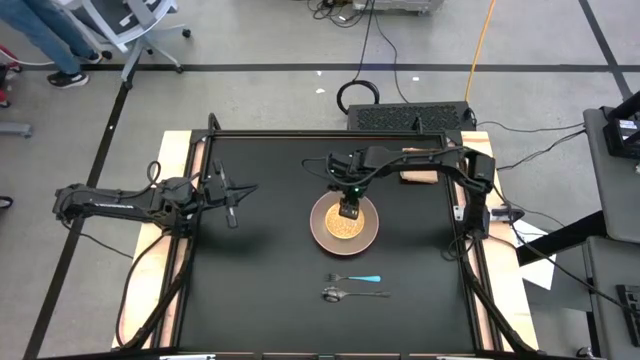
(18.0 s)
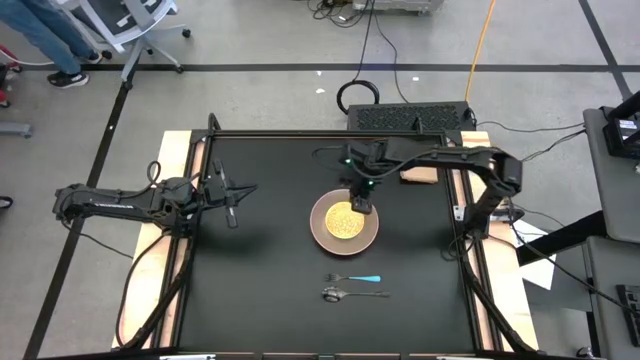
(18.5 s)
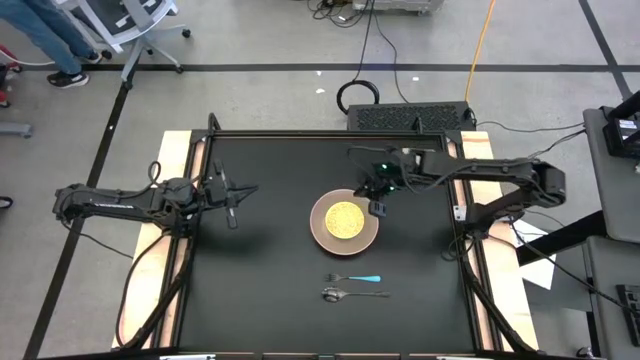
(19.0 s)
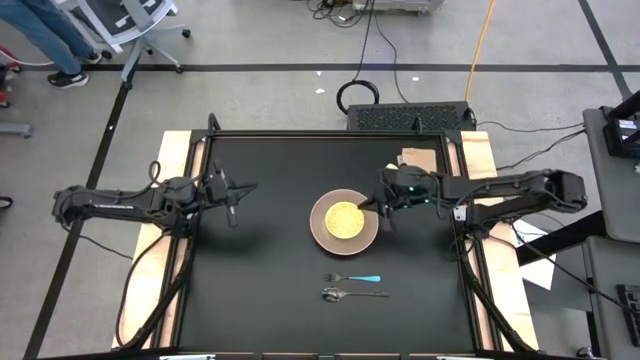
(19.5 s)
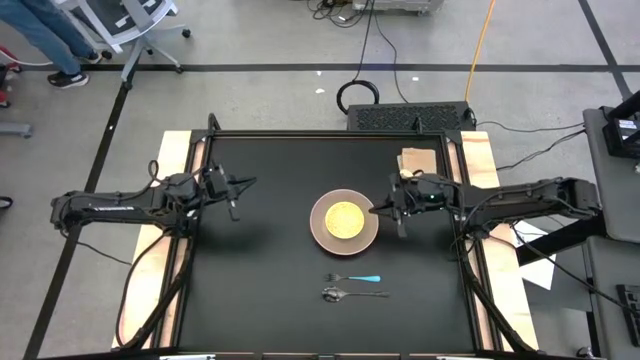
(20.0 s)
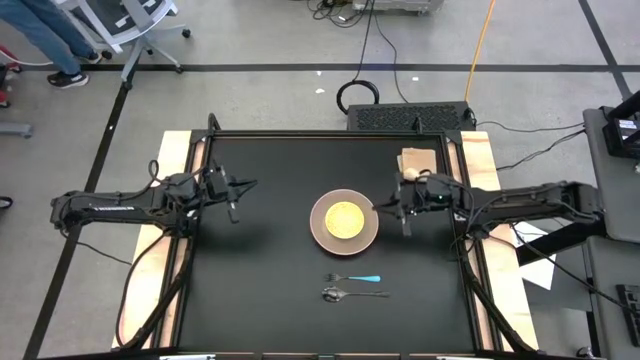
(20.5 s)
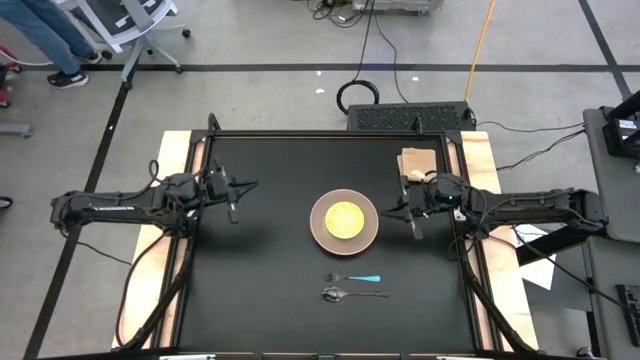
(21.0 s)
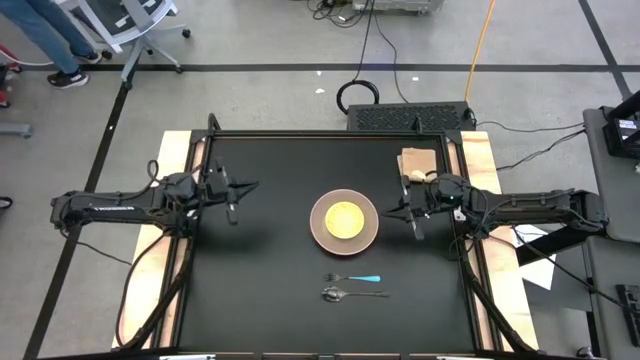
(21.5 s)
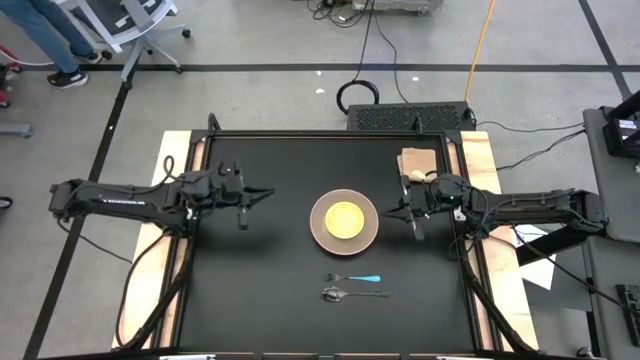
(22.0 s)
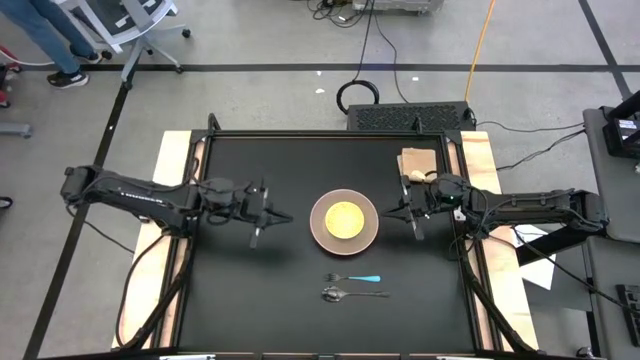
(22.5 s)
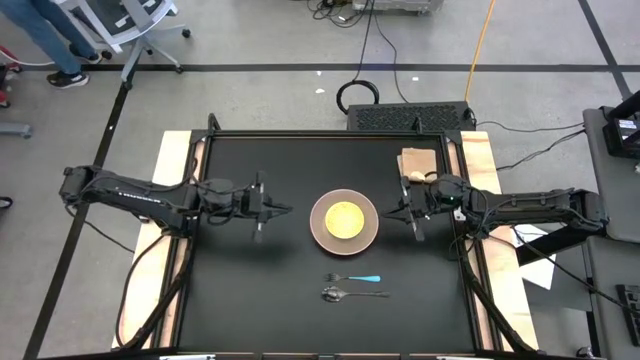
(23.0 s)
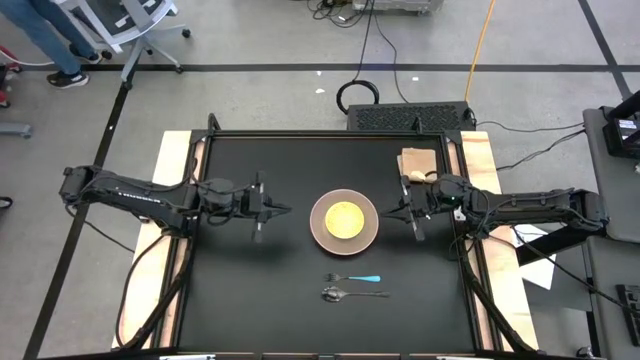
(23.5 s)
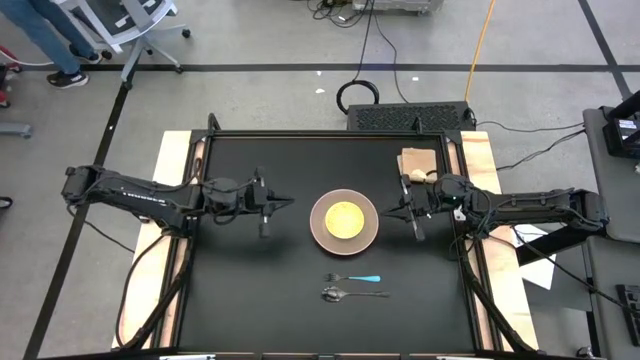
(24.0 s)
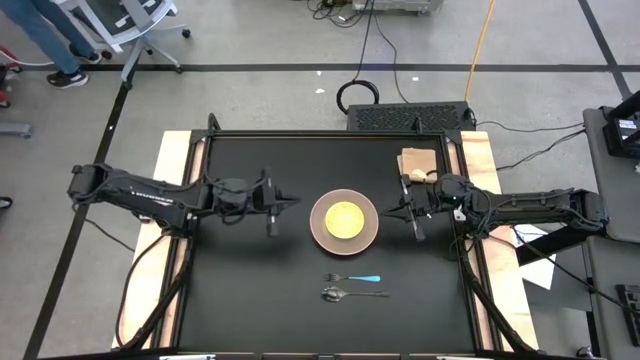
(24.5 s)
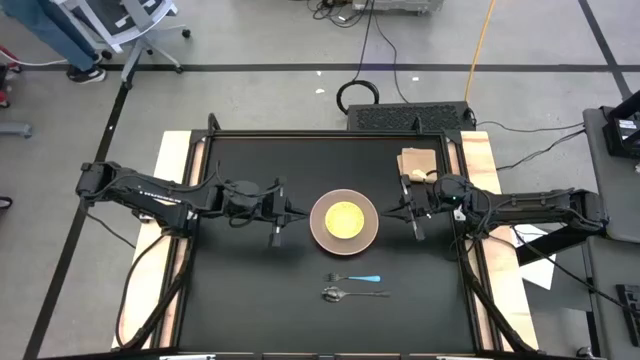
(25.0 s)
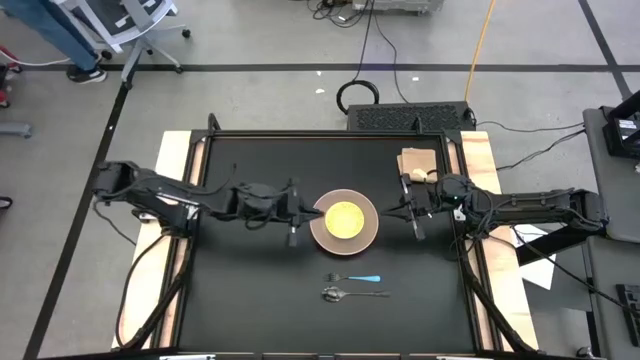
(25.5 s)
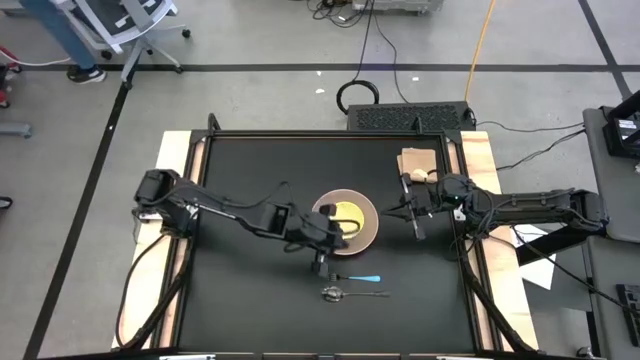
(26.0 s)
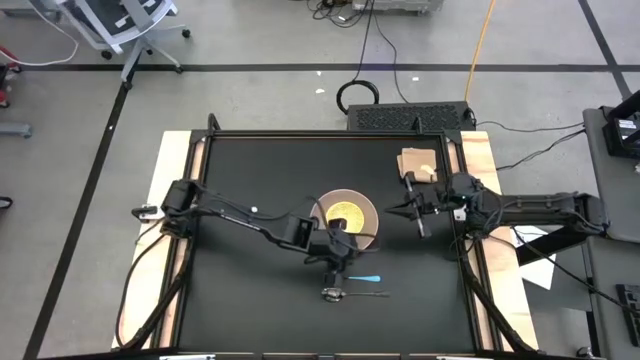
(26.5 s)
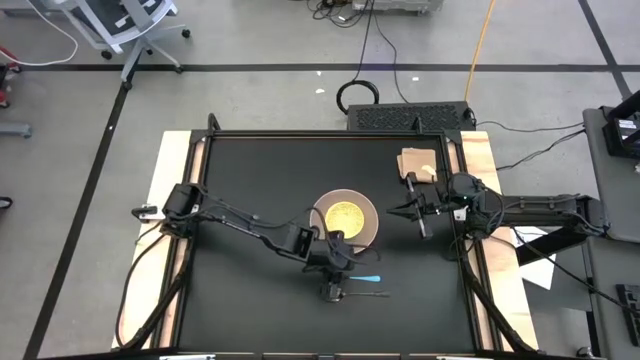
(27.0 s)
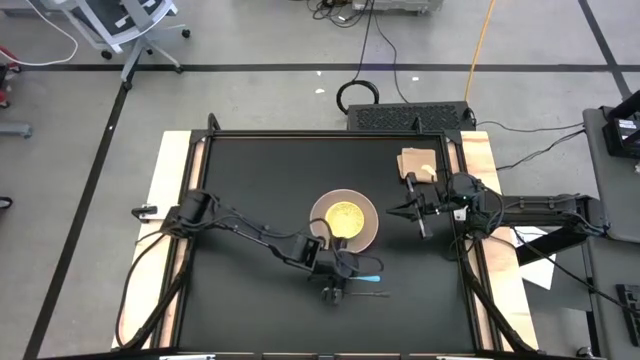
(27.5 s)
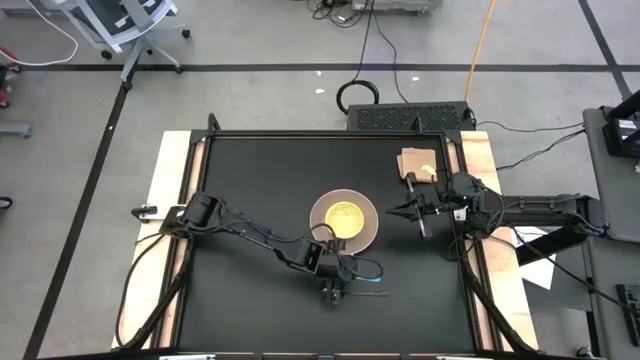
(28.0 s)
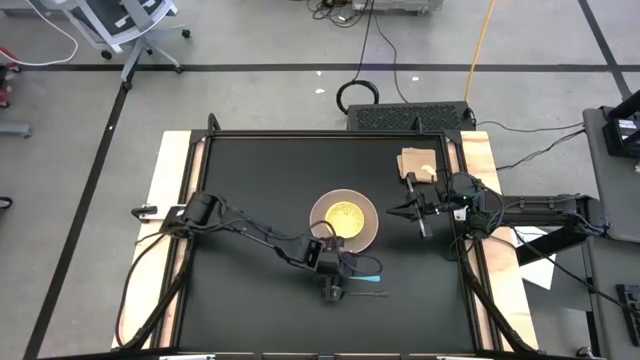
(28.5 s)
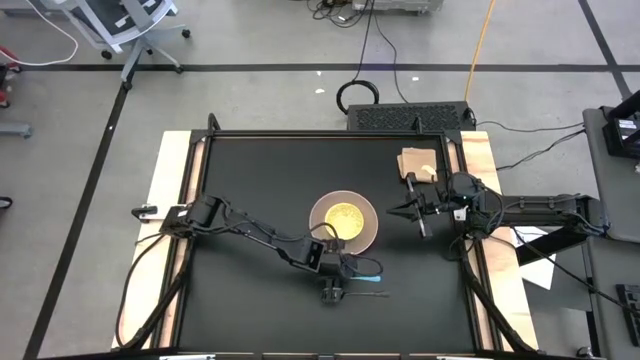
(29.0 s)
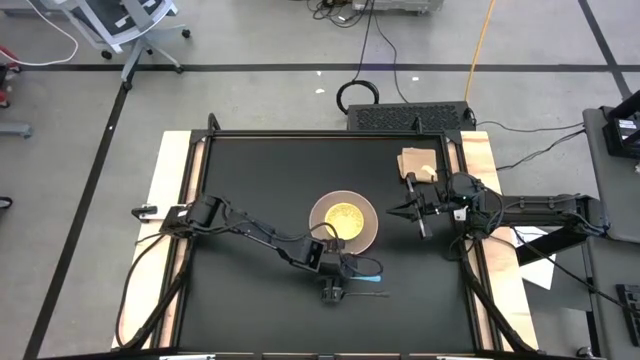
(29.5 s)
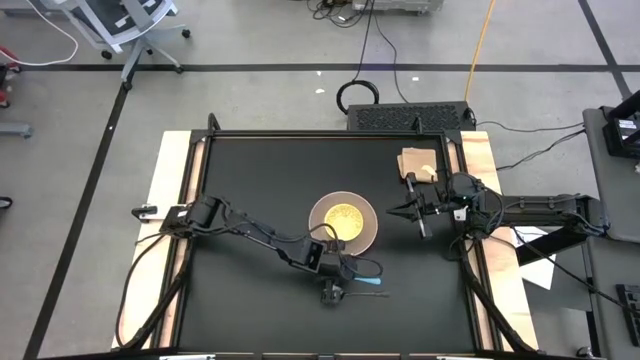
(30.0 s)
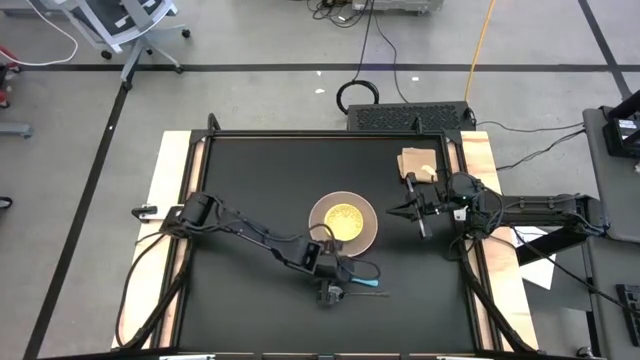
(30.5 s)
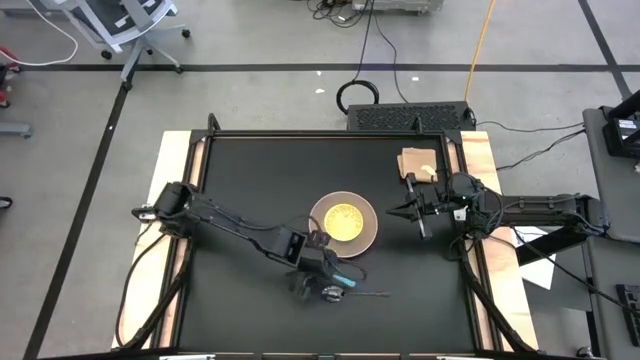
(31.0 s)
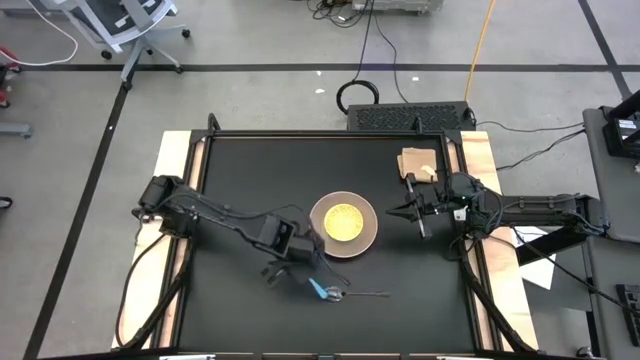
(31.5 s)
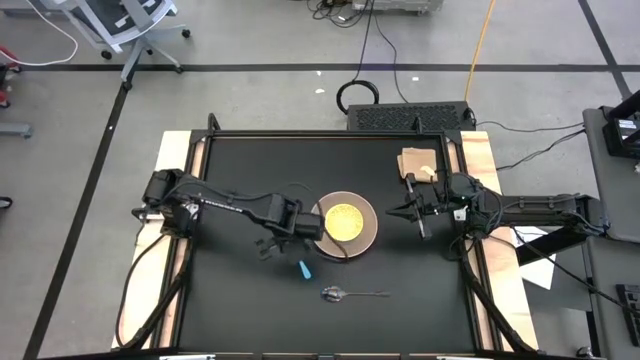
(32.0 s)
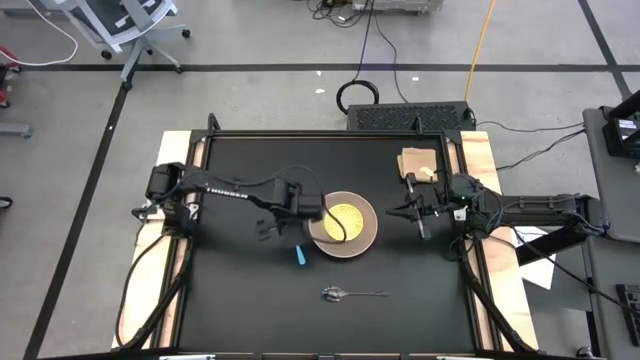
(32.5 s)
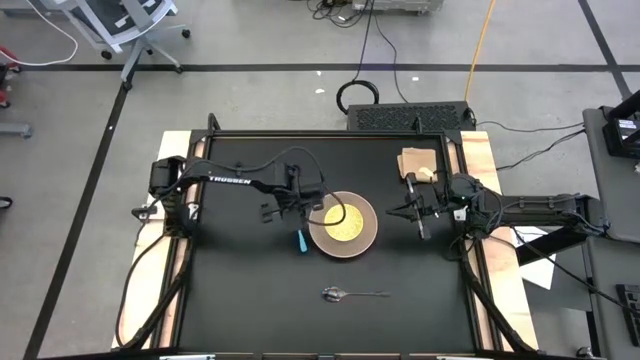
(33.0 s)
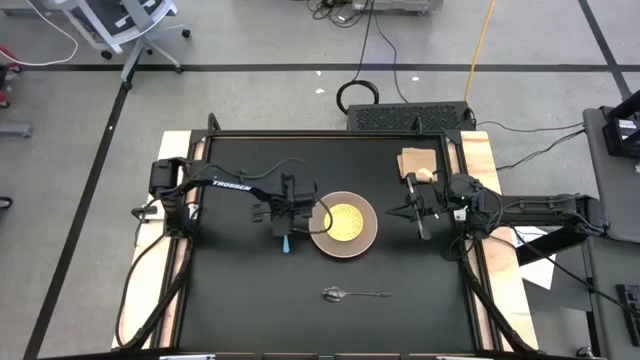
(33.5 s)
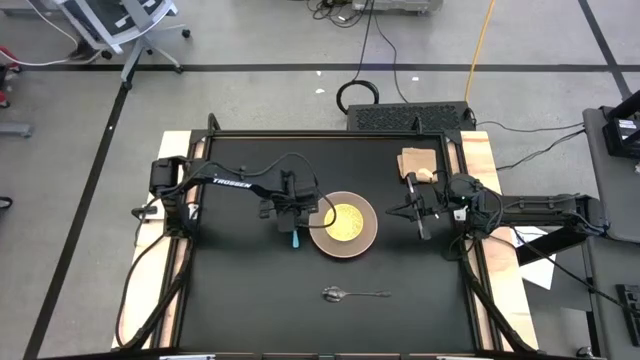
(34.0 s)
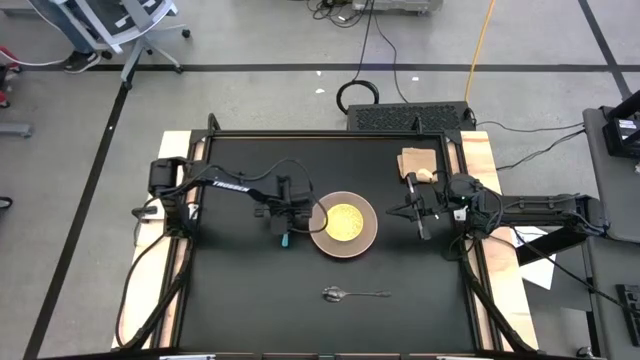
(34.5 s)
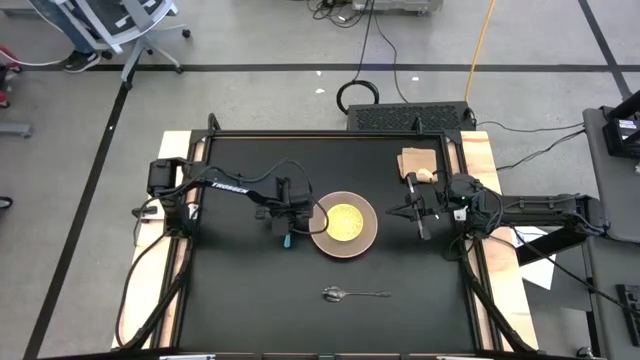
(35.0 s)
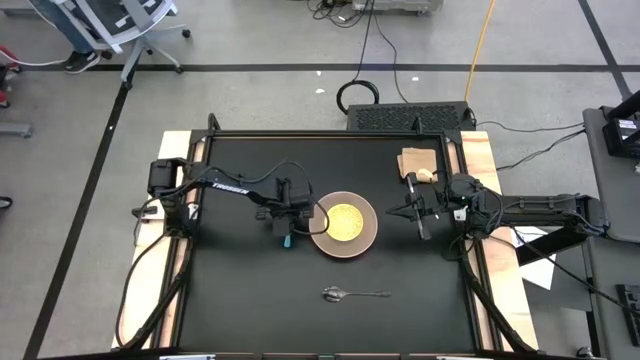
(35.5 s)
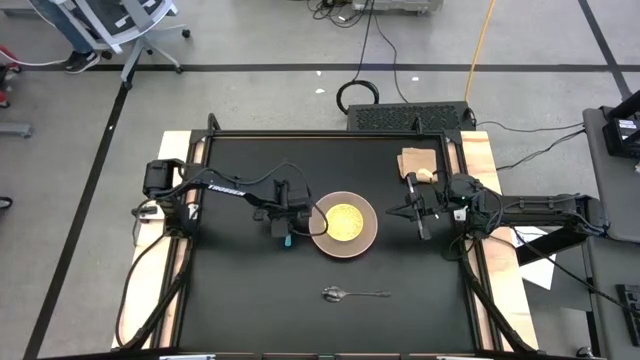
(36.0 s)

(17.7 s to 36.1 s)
Task: Set table place
Put the light blue fork on the left side of the brown plate

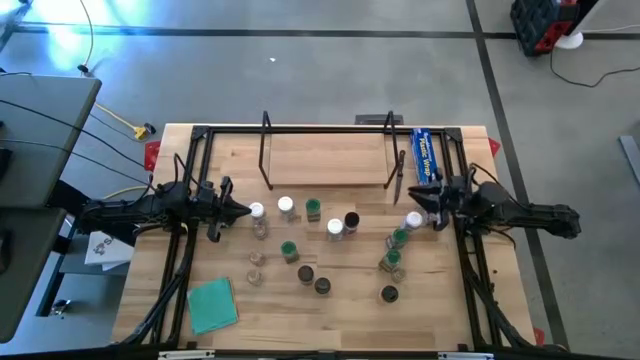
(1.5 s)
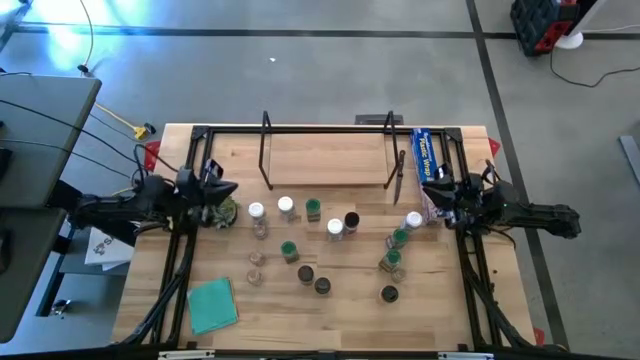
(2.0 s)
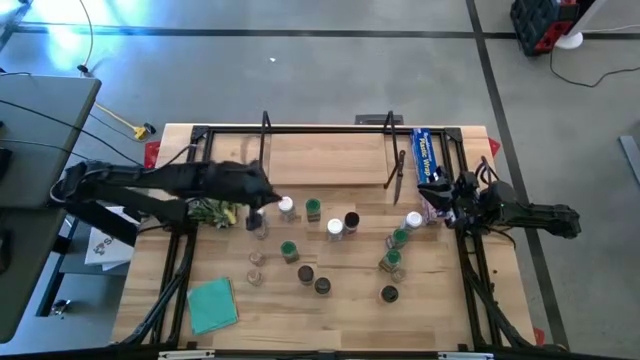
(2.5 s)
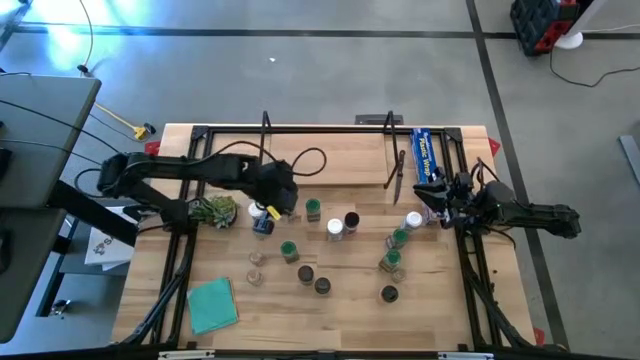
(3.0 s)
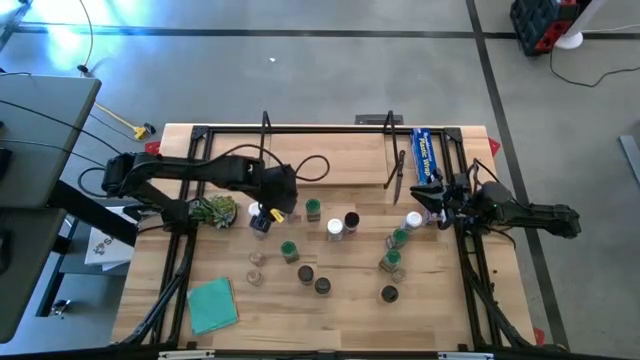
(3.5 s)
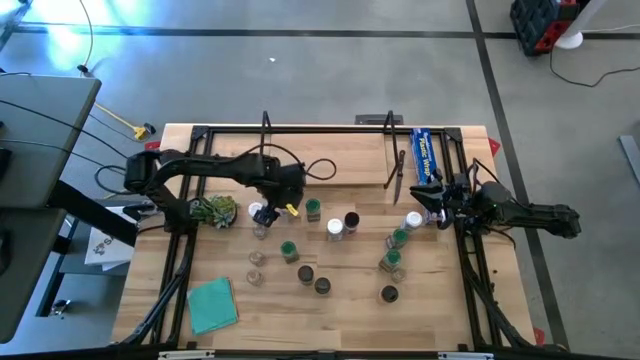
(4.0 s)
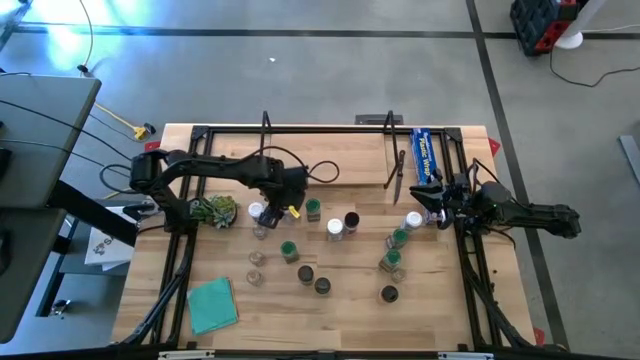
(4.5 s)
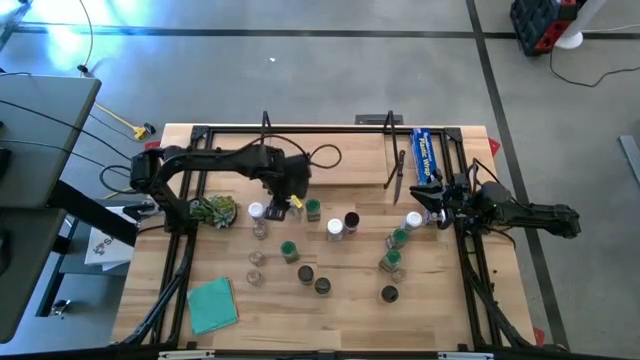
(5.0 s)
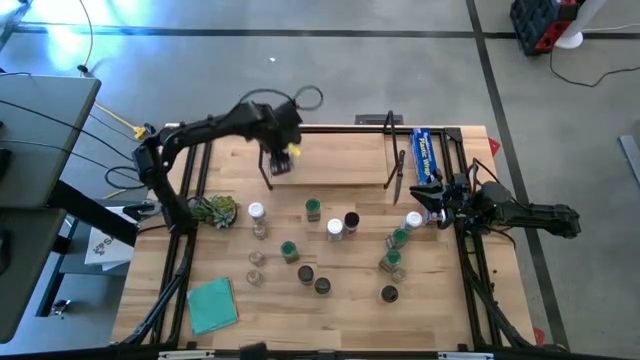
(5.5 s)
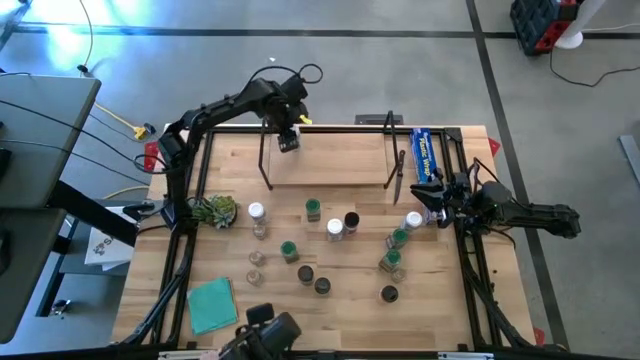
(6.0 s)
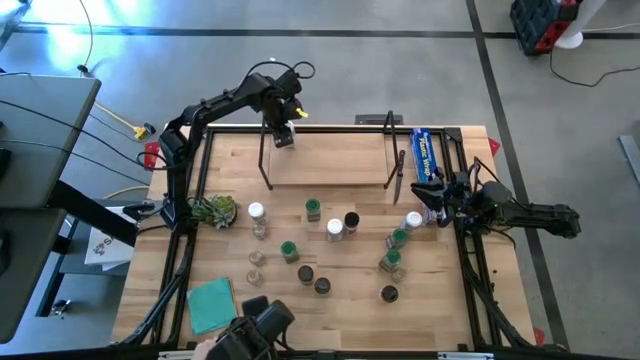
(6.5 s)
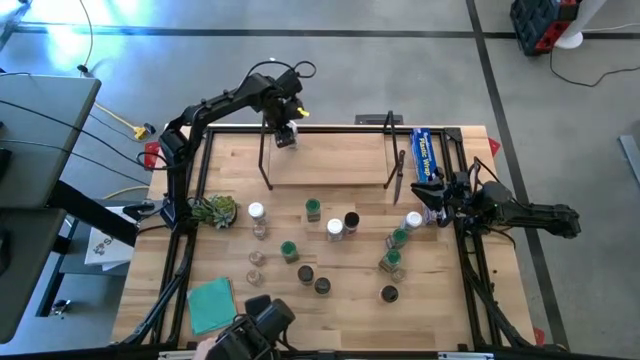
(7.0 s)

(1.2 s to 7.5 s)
Task: Shelf spices
Put the white seasoning bottle on the shelf
